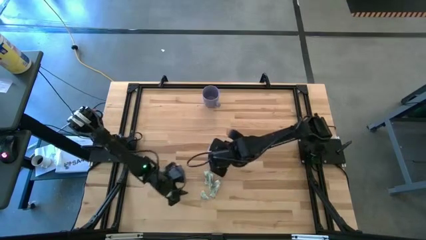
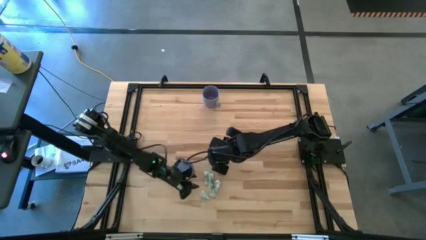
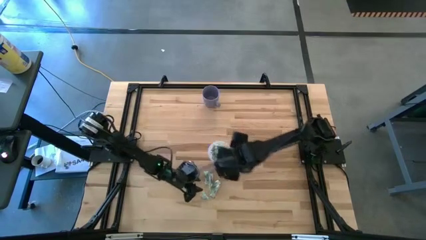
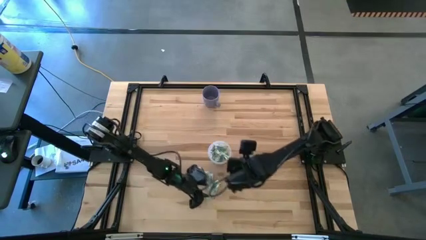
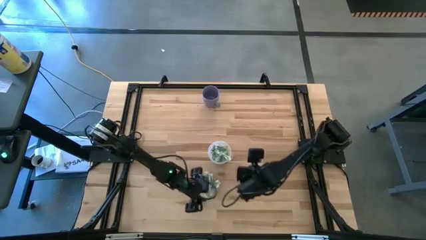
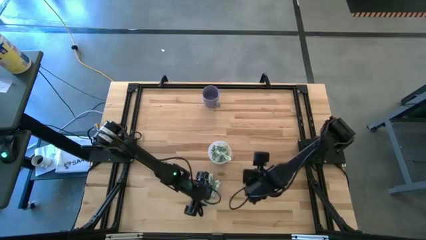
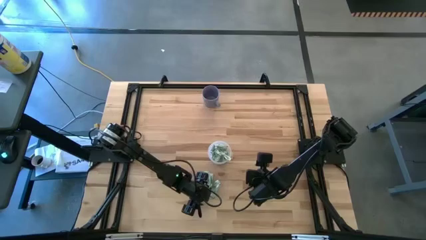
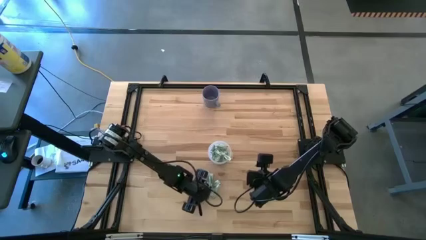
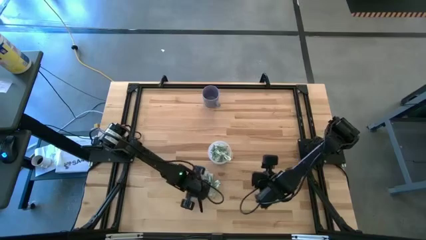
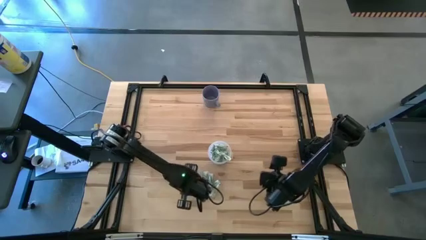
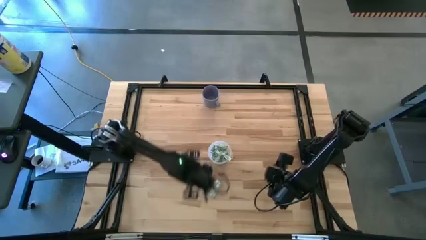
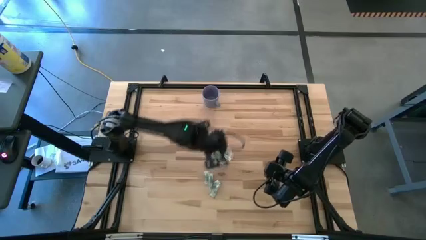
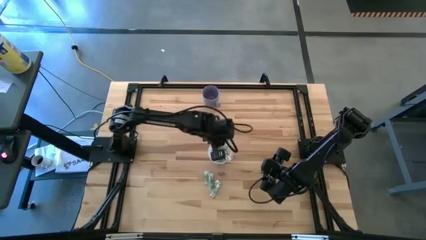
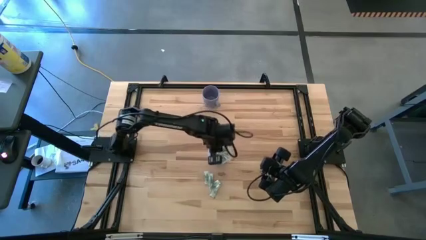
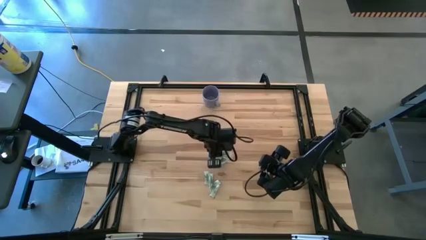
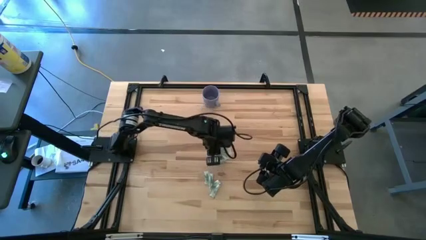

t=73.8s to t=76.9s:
Task: Pick and place Stevia / Truvia into bins
Put the stevia packet into the transparent container

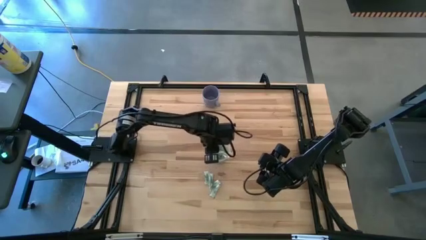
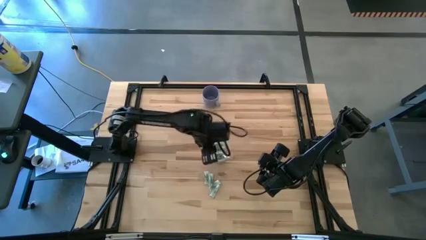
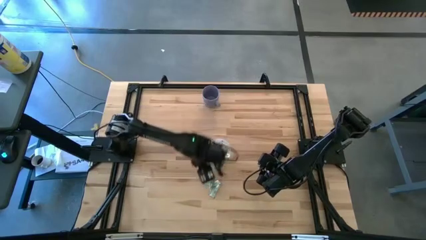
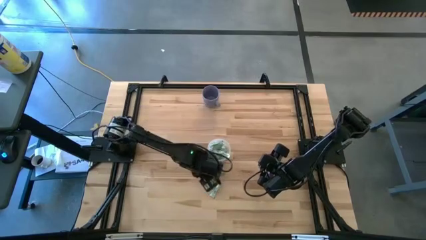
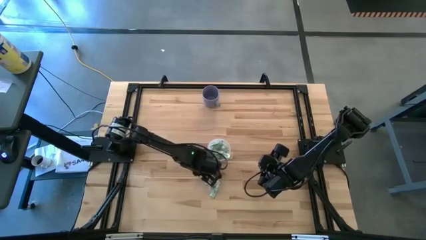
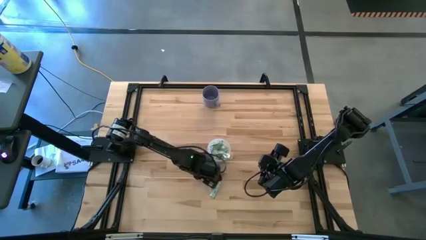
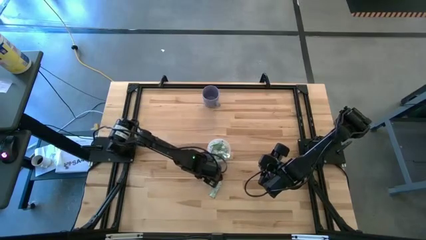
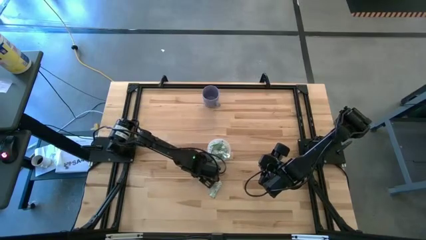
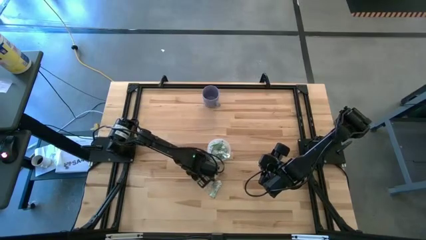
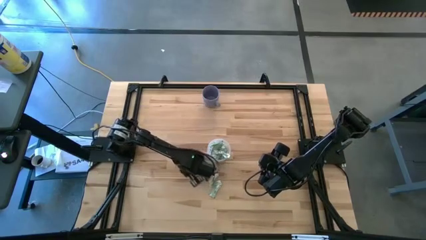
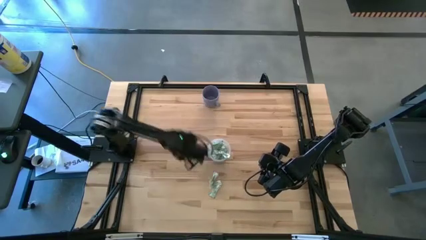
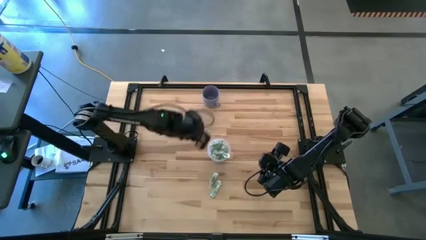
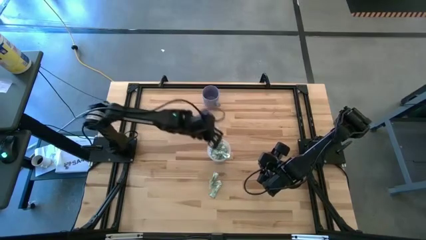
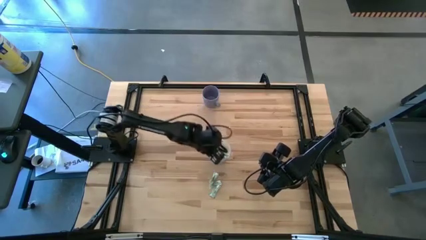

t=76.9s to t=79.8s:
Put the stevia packet into the transparent container

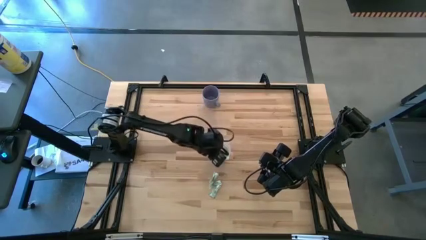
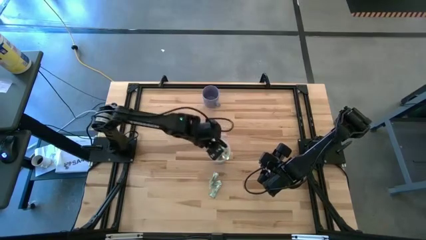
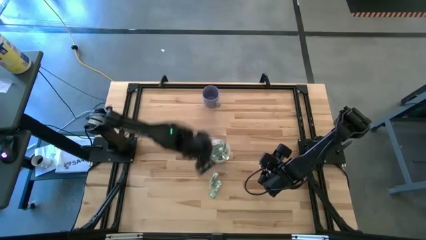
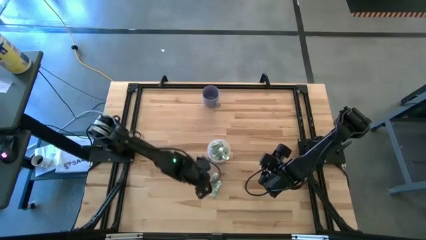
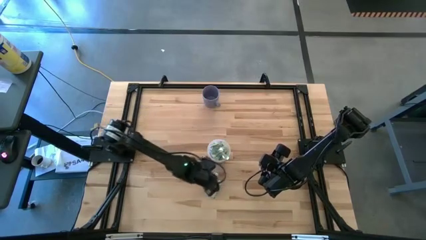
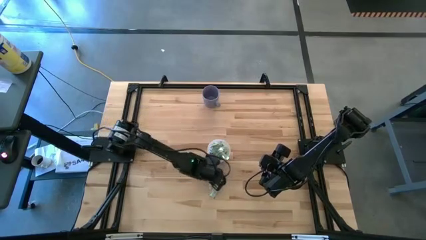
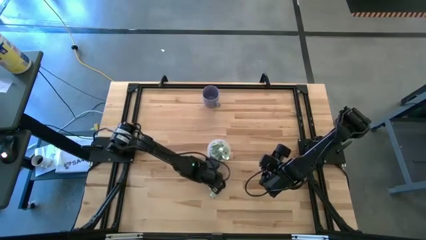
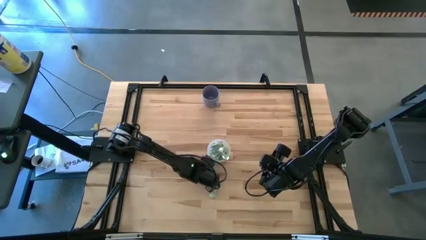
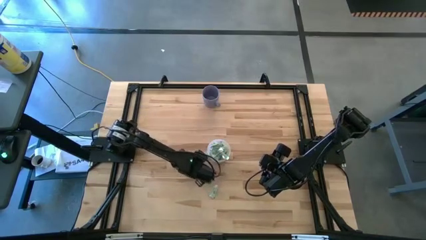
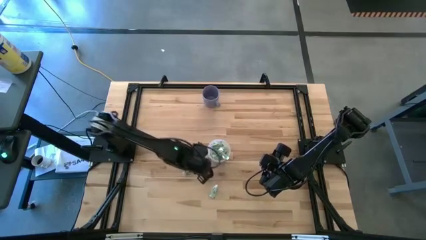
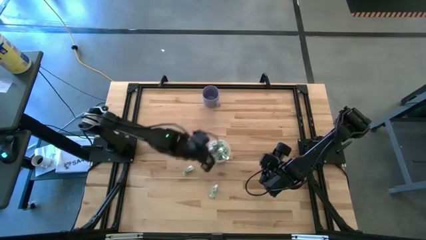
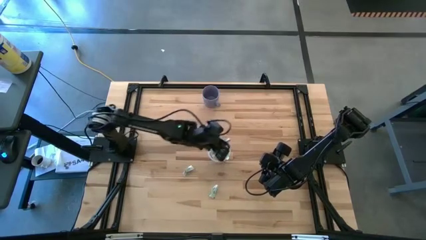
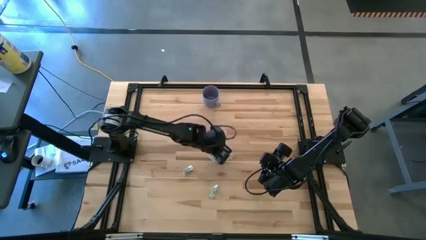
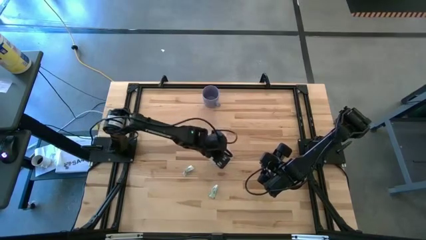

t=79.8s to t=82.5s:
Put the stevia packet into the transparent container

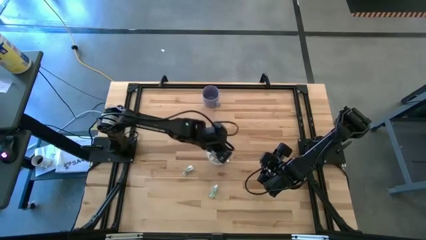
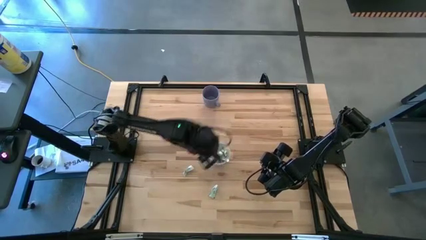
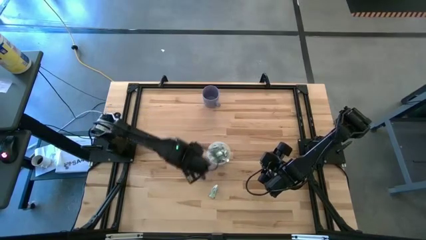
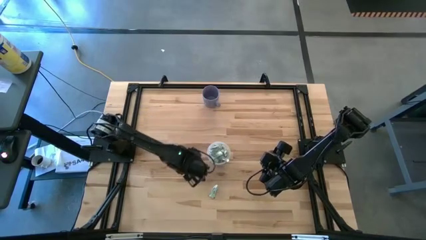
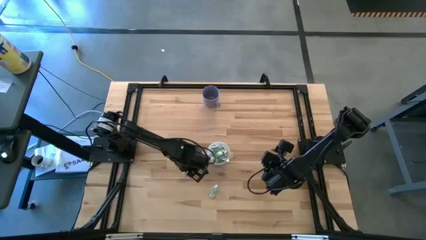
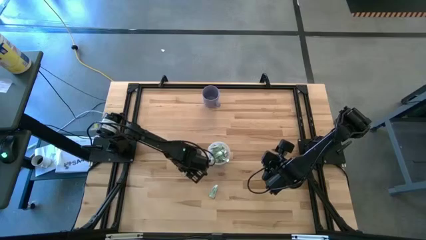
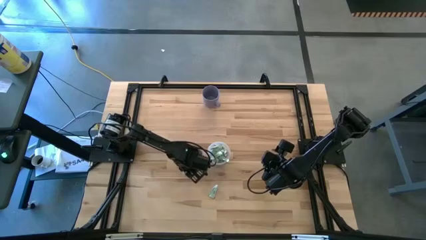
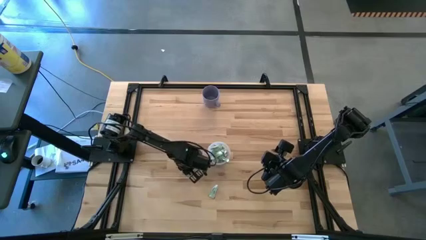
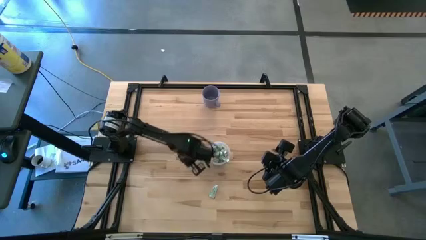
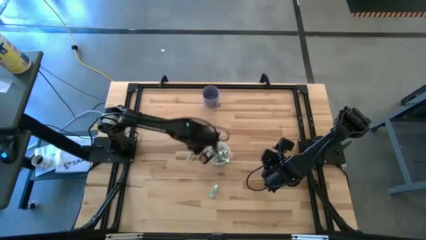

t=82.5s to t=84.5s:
Put the stevia packet into the transparent container

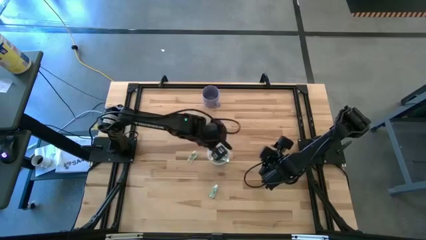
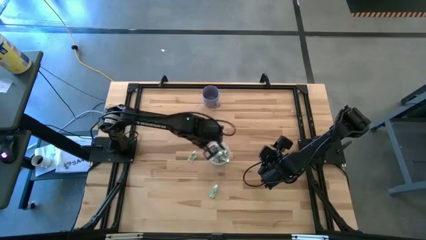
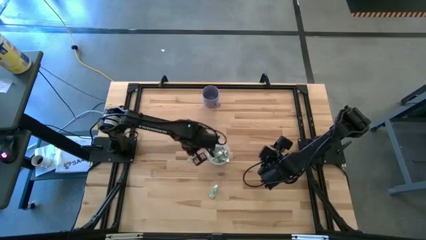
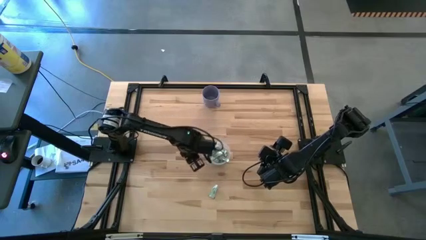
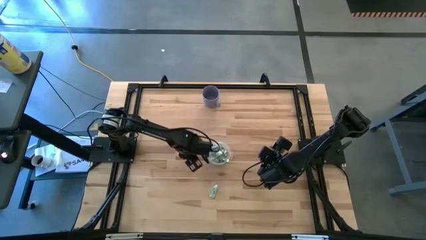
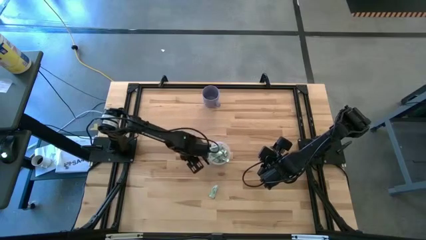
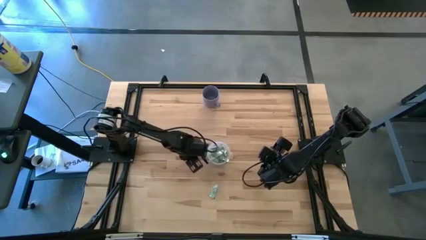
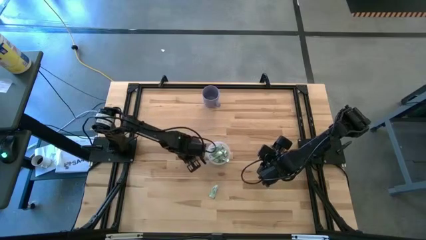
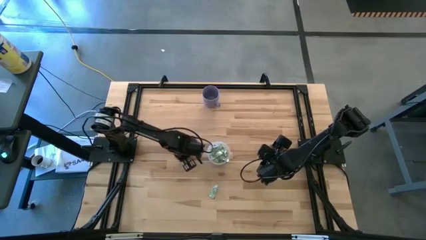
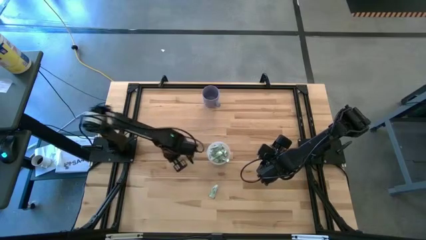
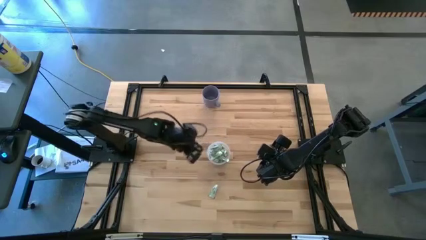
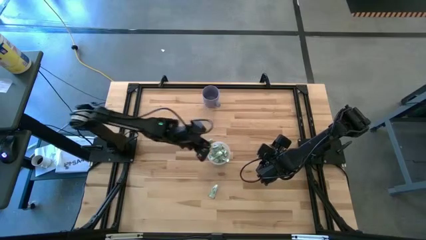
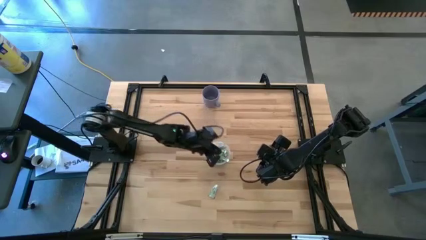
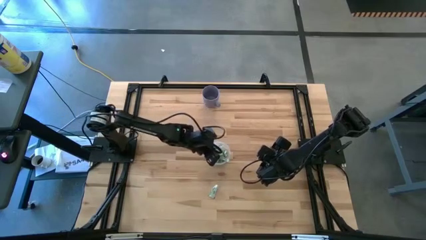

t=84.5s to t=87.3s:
Put the stevia packet into the transparent container

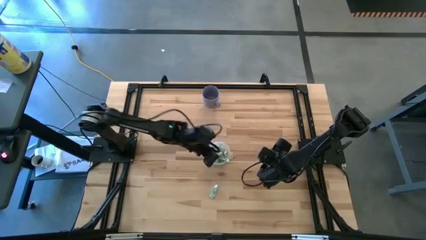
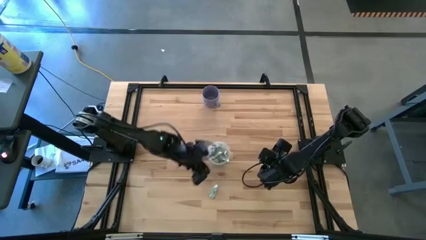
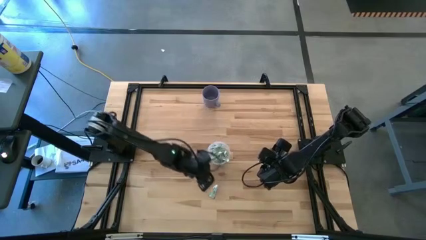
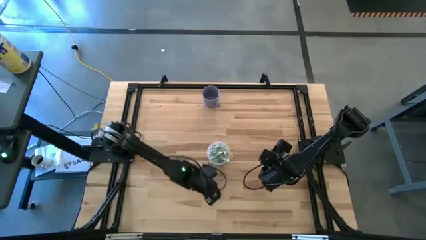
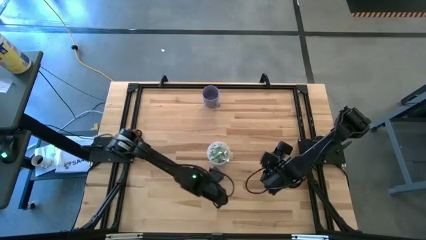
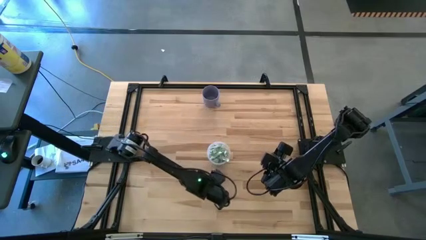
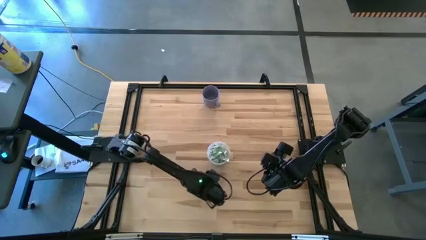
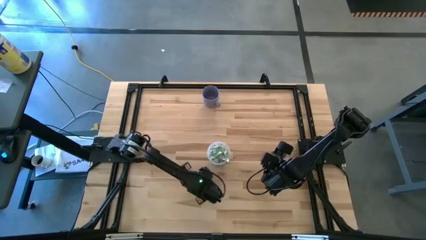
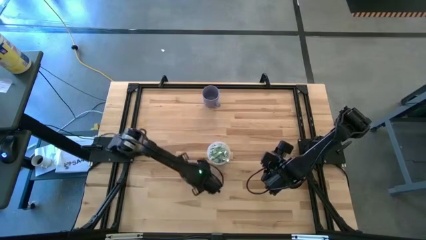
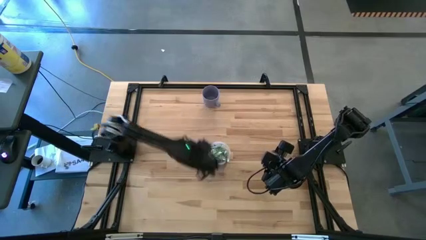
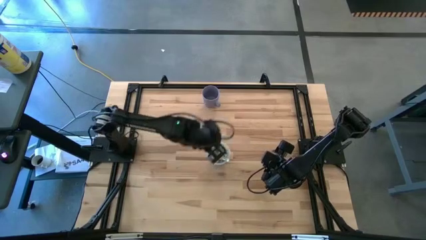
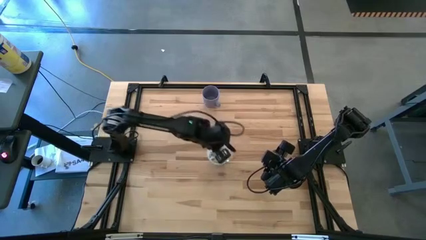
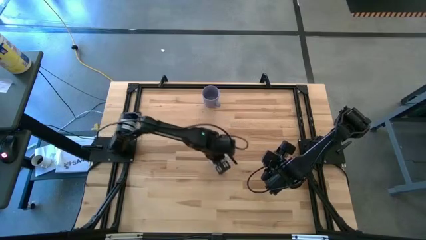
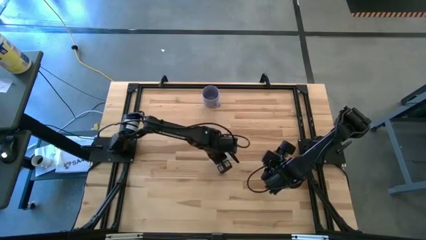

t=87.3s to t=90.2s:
Put the stevia packet into the transparent container

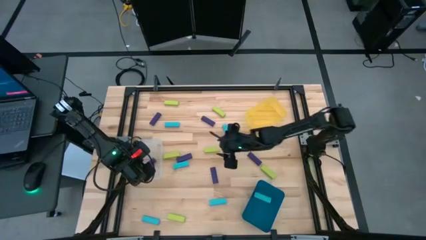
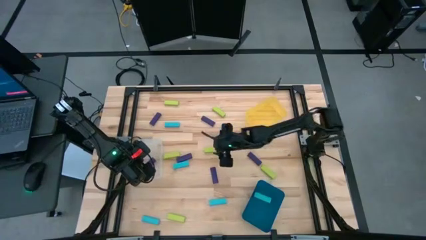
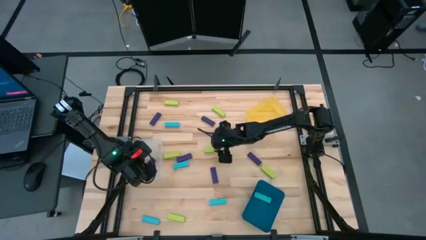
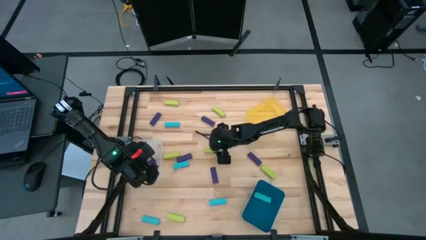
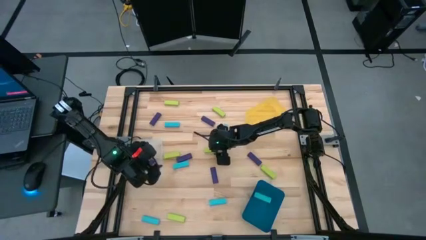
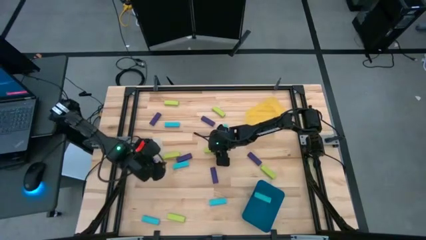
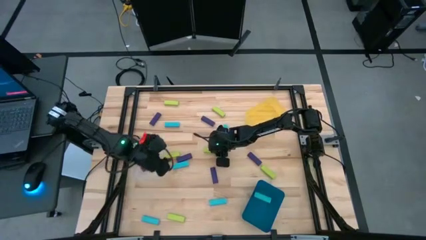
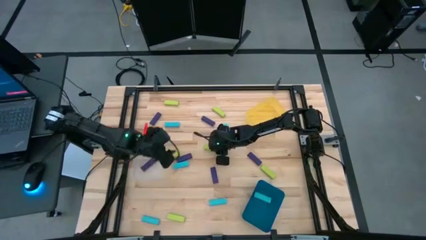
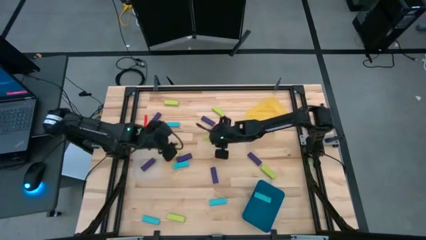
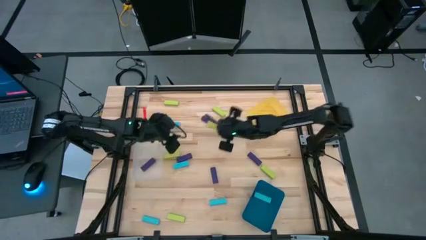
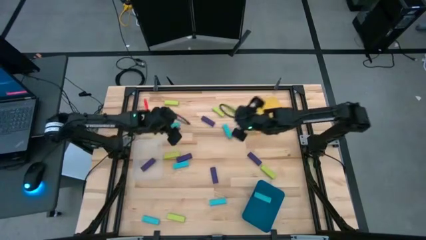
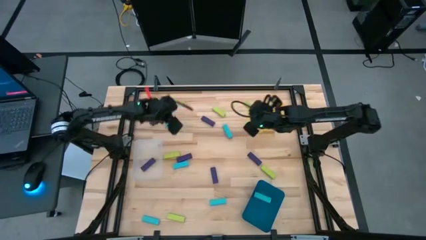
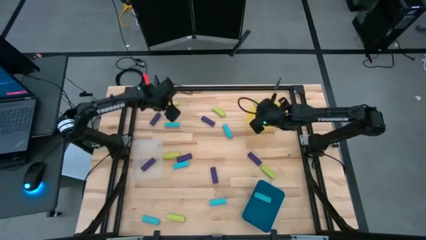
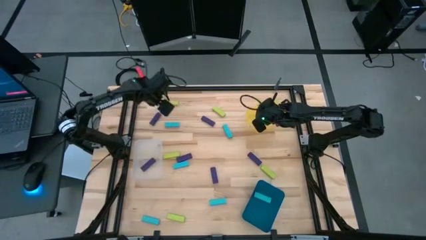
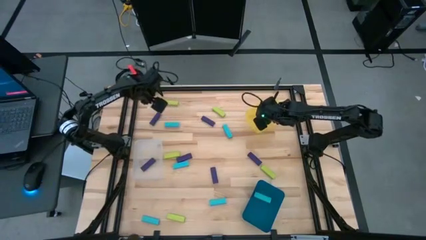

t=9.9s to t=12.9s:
Task: Sort blocks
Put the green block into the yellow bin
